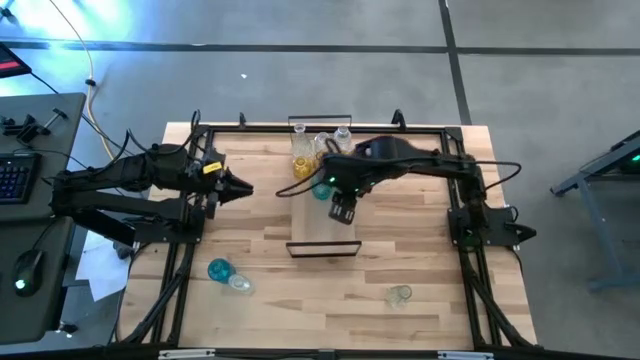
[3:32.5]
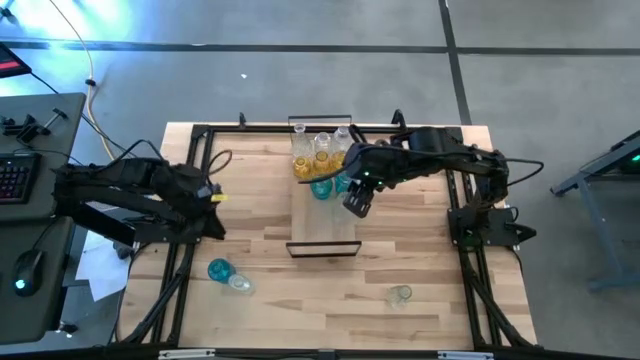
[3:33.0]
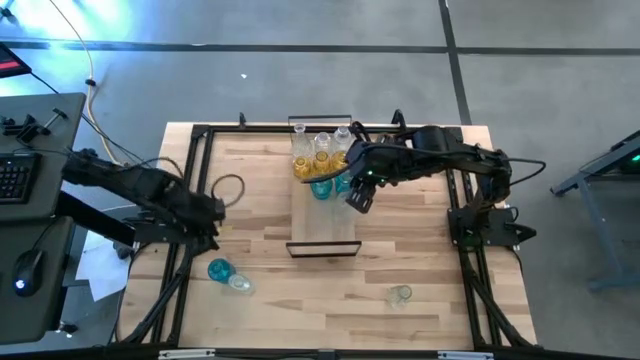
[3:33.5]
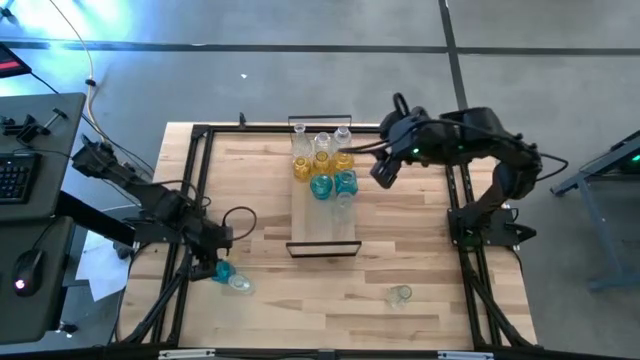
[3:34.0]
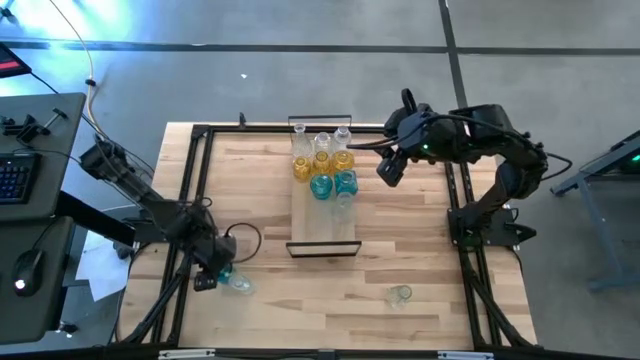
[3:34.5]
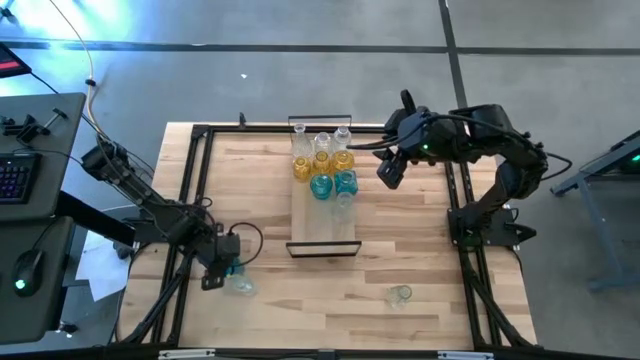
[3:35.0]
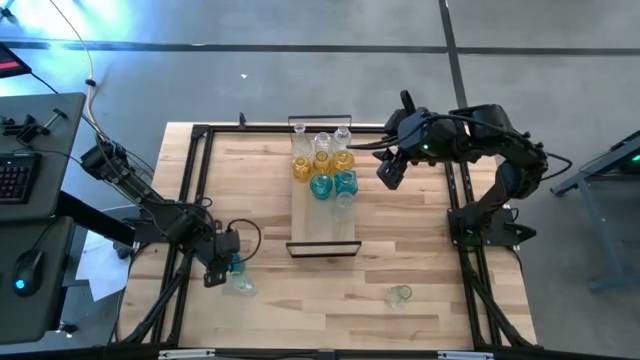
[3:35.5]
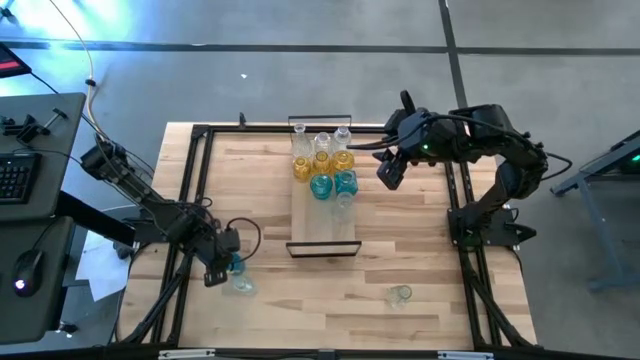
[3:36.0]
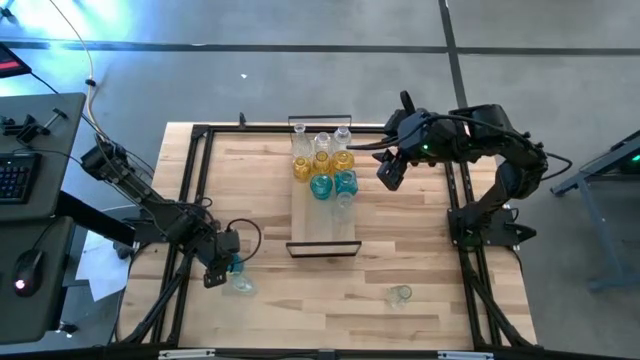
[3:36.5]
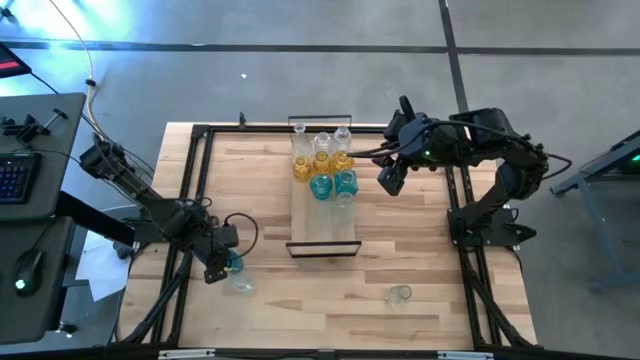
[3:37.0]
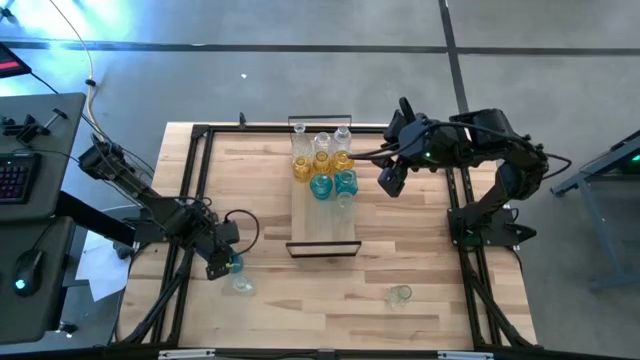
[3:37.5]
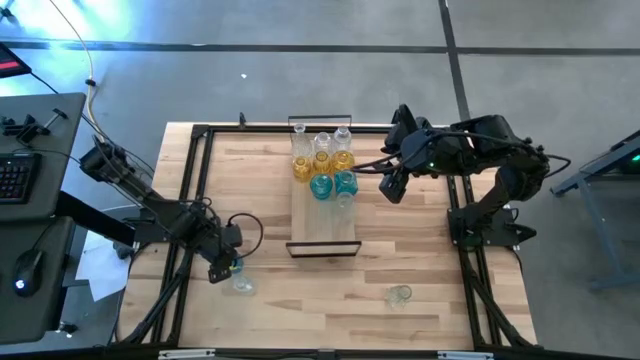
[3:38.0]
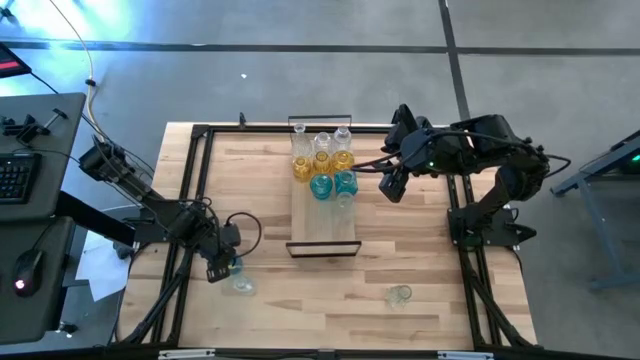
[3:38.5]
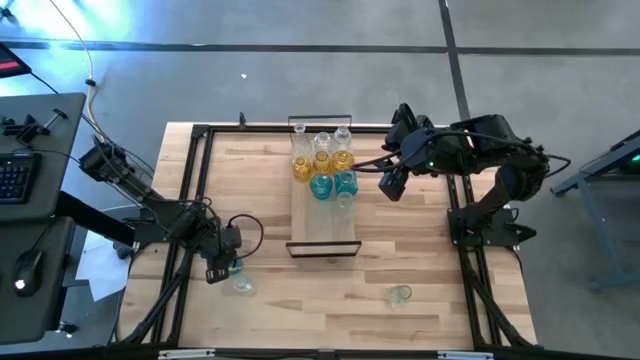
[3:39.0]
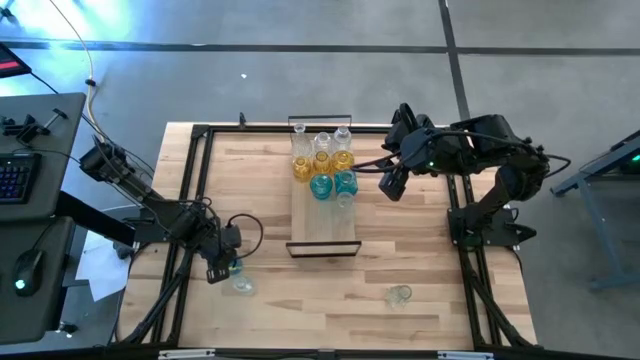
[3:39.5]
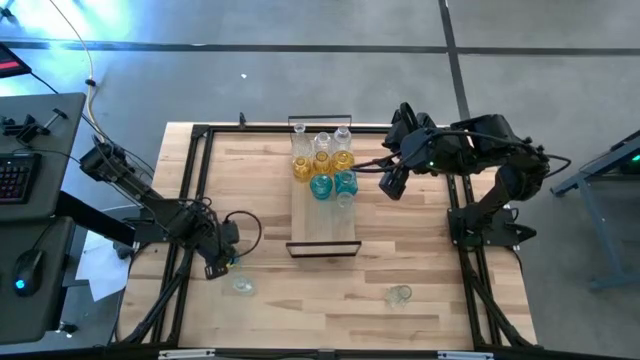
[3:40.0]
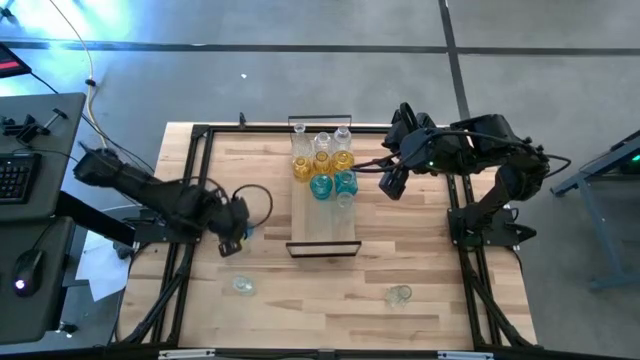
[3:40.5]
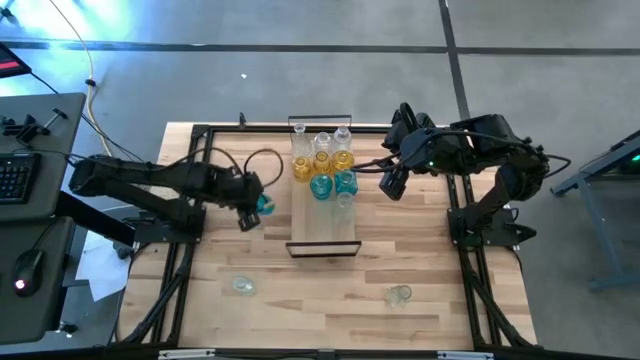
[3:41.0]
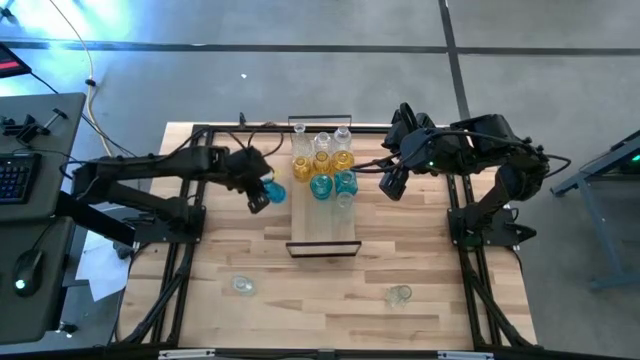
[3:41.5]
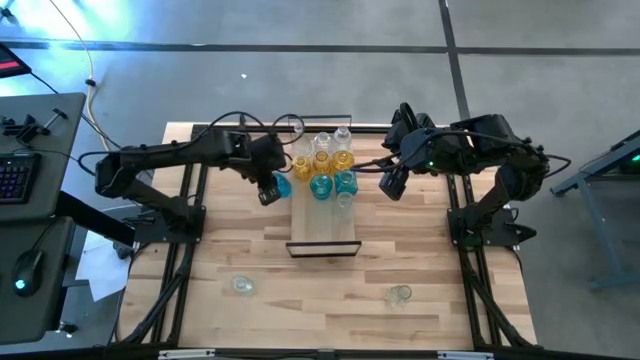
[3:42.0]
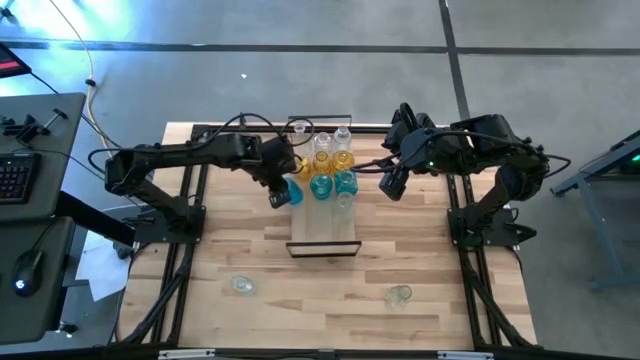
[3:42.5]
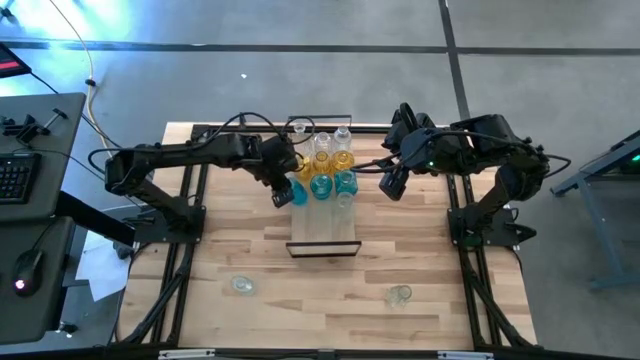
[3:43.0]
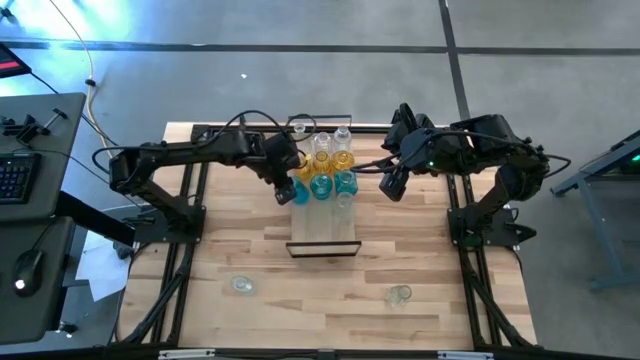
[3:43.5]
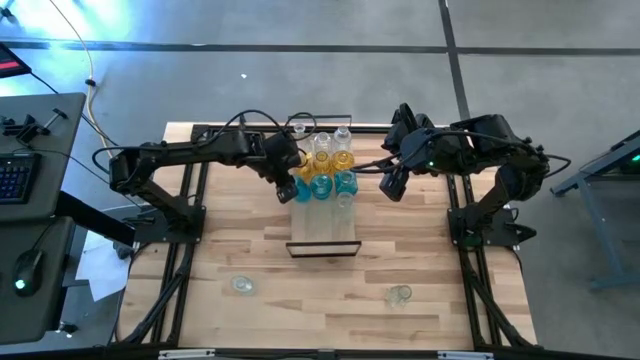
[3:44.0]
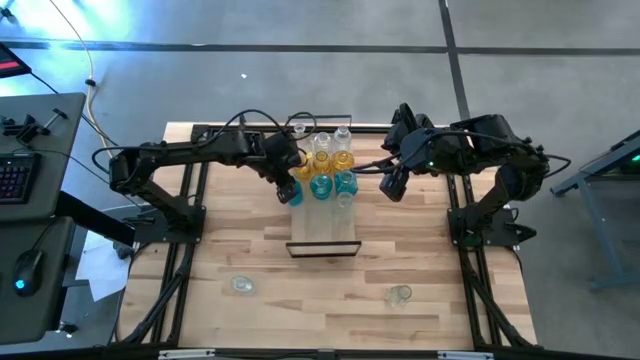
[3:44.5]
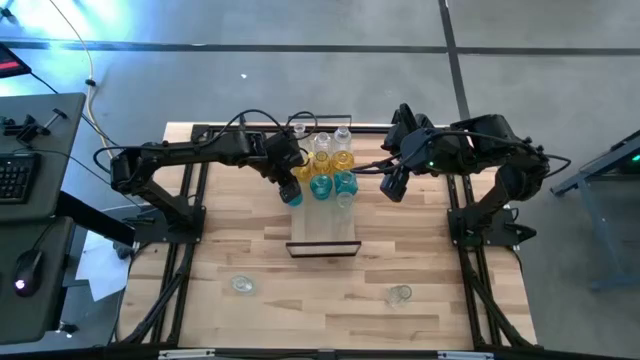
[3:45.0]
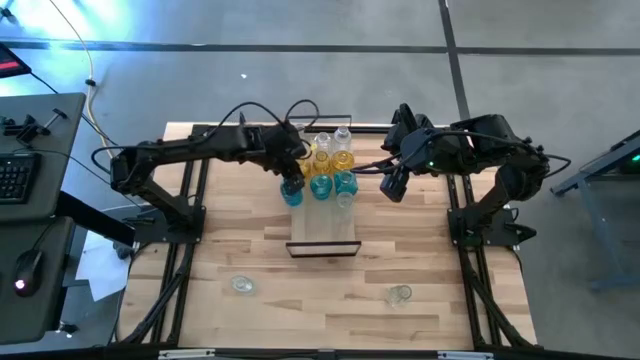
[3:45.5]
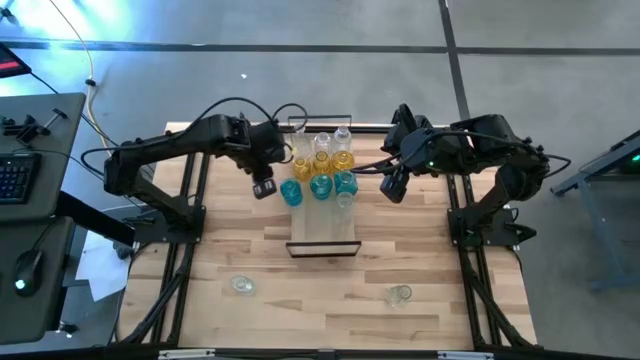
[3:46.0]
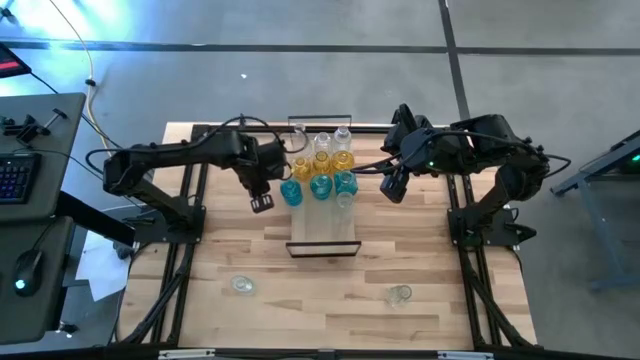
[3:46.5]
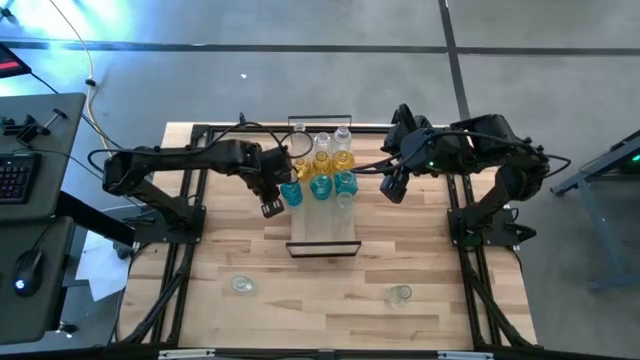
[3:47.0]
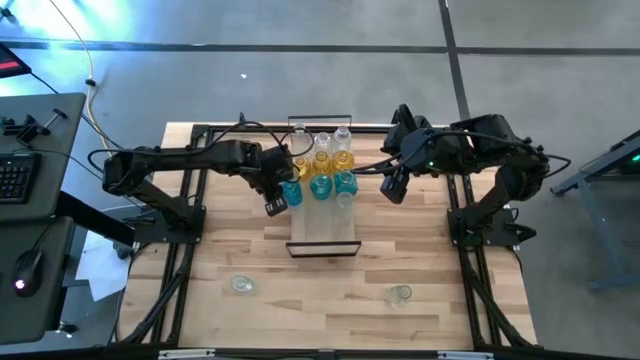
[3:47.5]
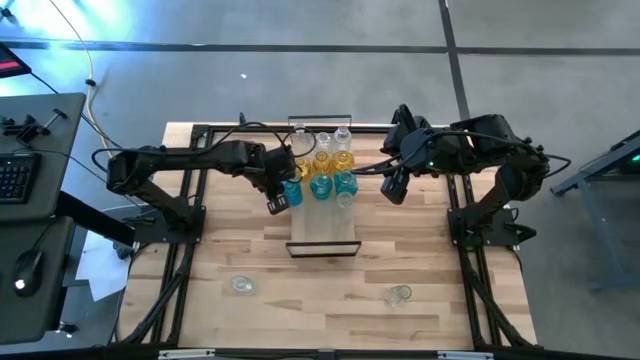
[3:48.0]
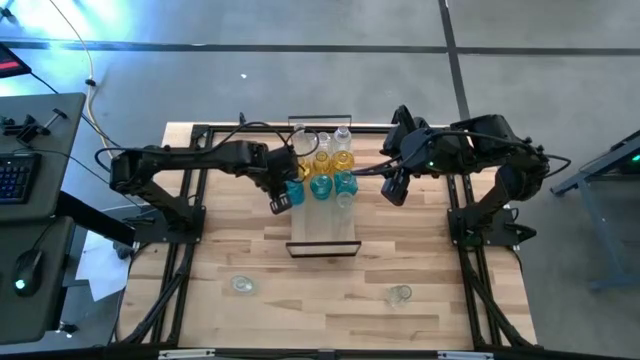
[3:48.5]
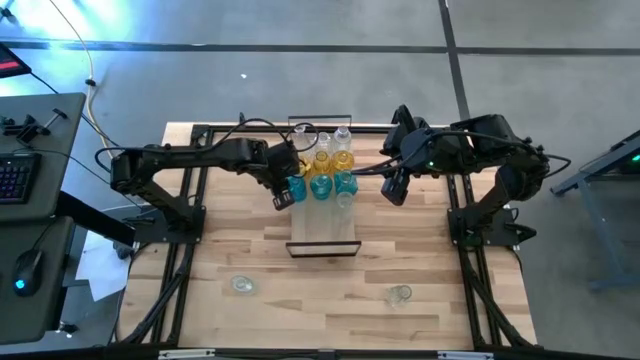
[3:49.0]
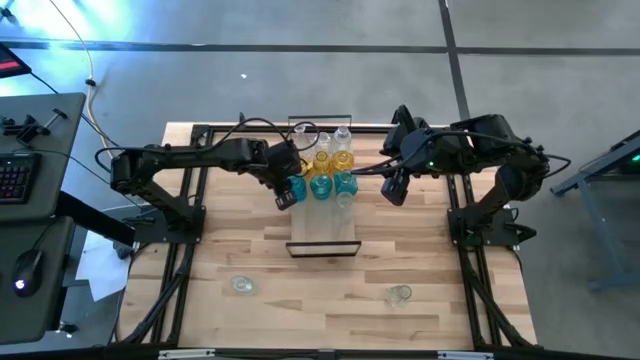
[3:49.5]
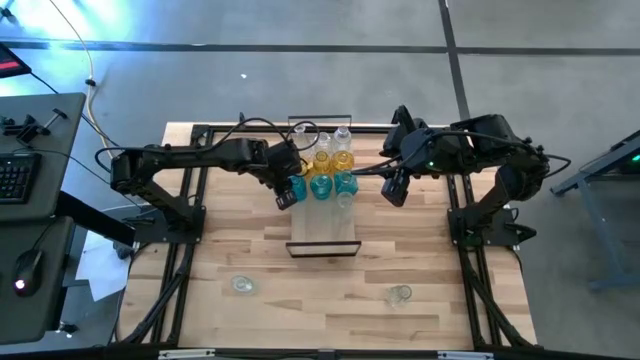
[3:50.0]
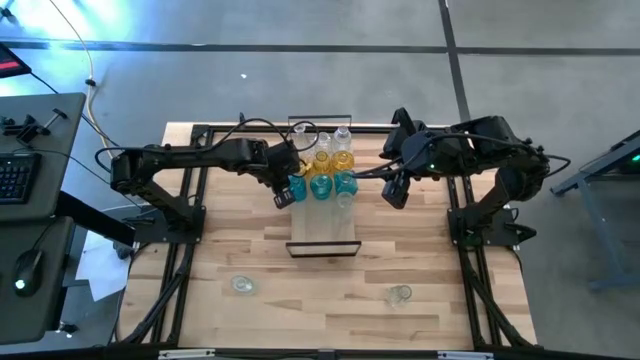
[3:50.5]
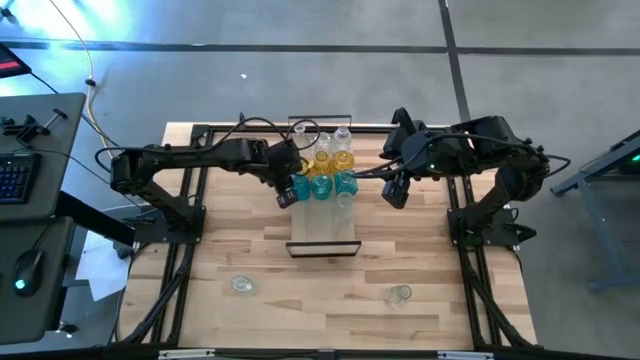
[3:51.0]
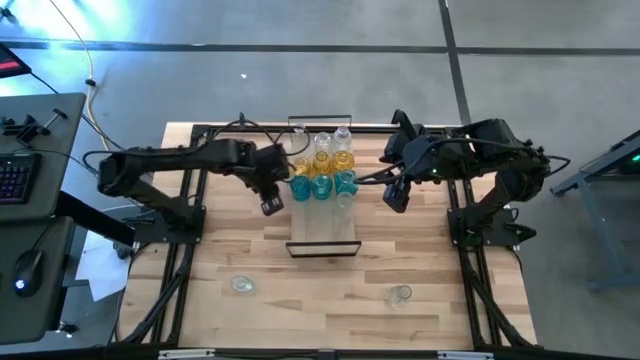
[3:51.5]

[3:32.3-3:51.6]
Task: sort vases onto shelf
Put the blue flower vase on the shelf aligned with the other blue flower vase

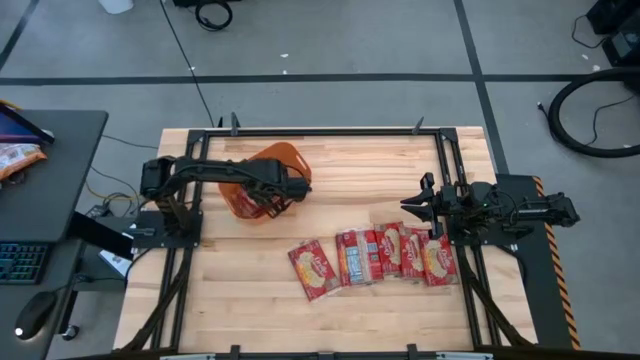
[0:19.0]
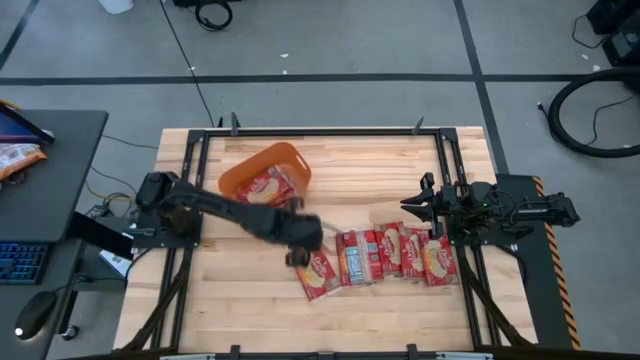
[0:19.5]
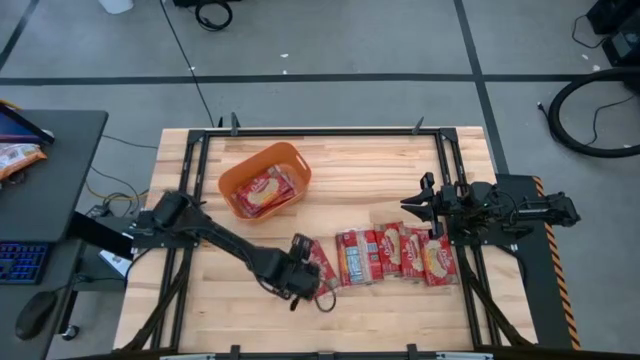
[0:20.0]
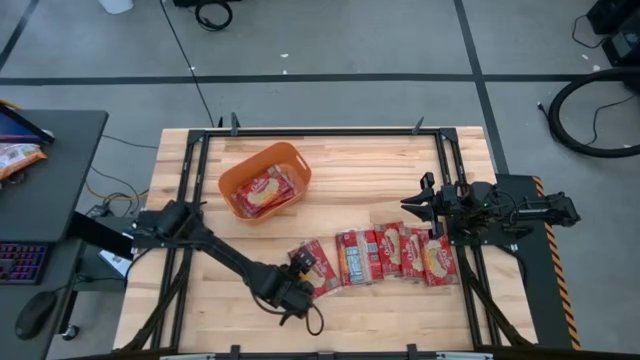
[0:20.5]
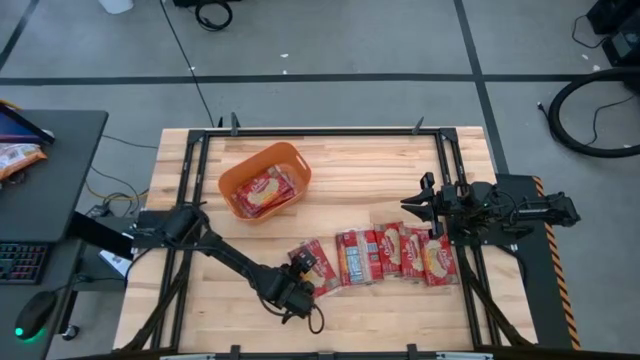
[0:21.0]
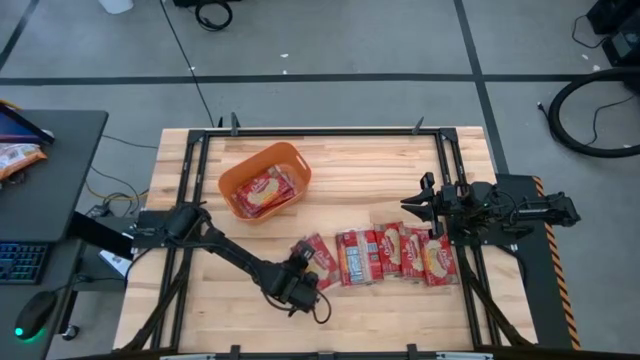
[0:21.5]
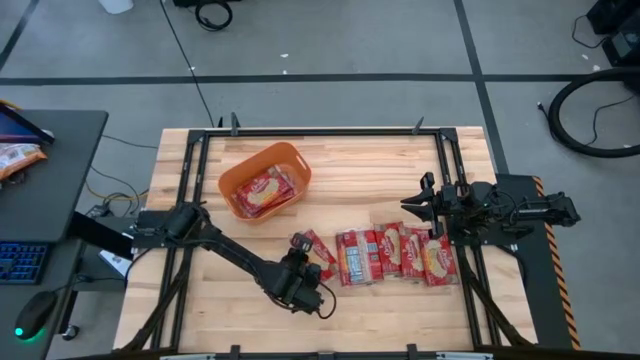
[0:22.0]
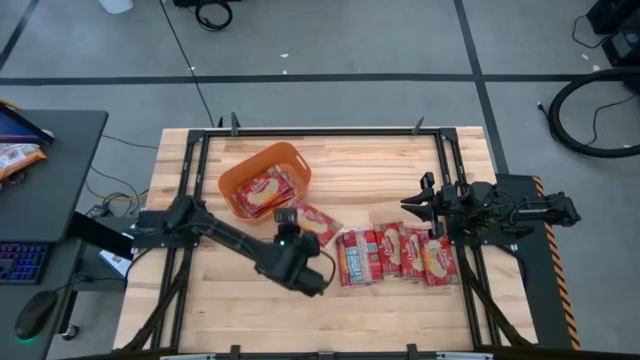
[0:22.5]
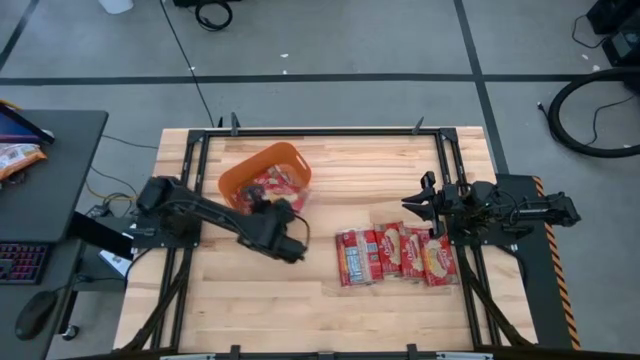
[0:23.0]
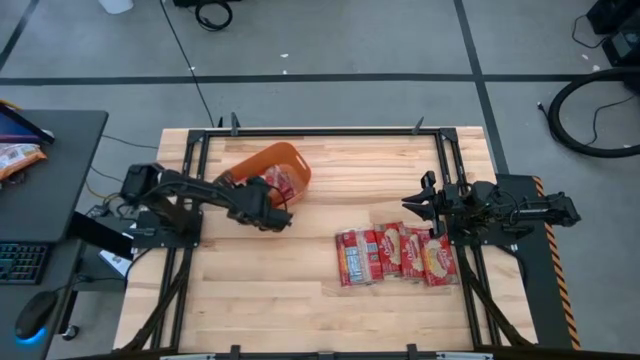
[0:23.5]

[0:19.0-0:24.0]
Task: Sort popcorn bags into baskets
Put the popcorn bag into the orange bin
